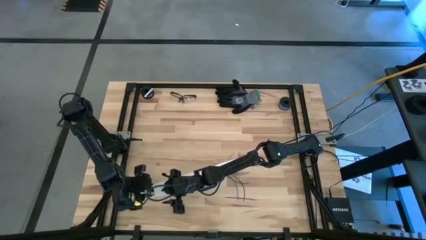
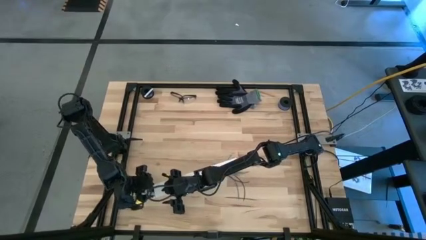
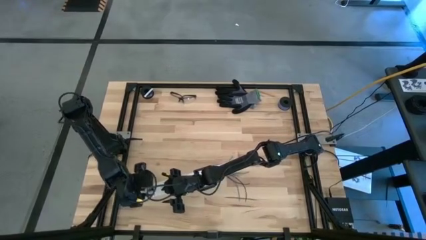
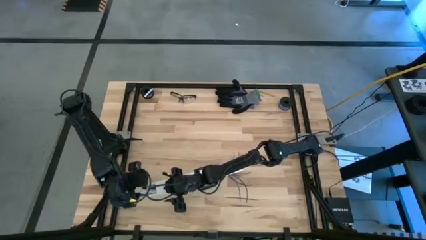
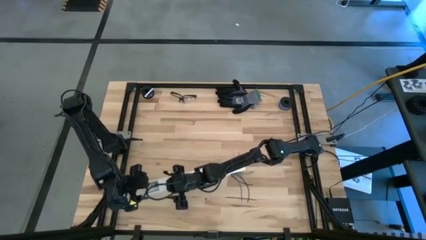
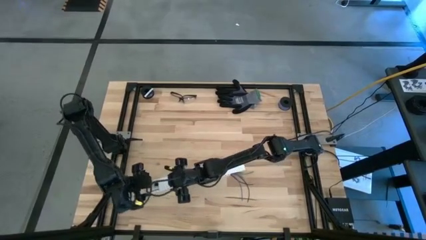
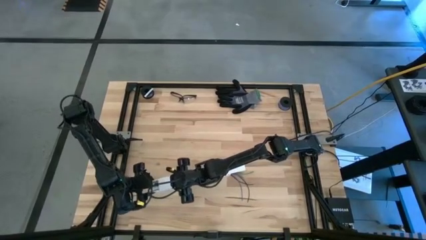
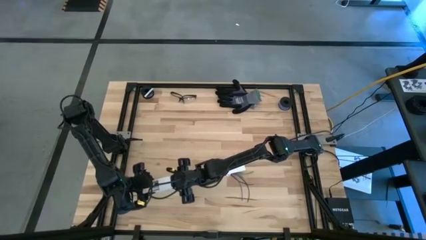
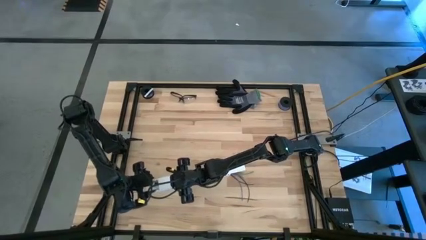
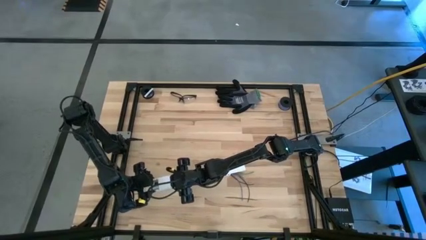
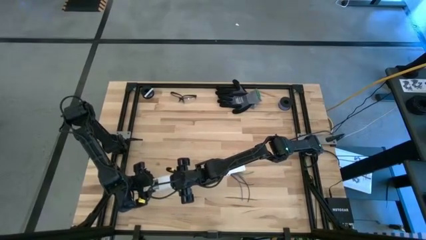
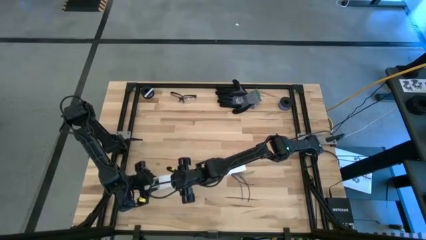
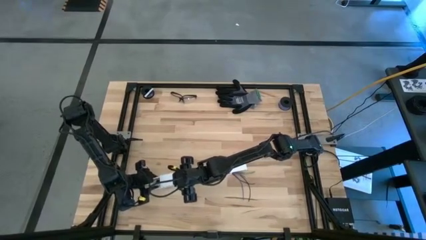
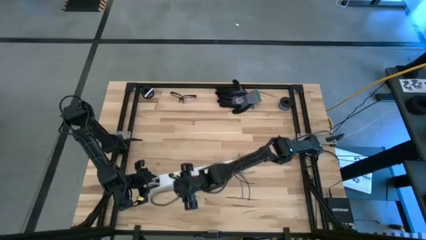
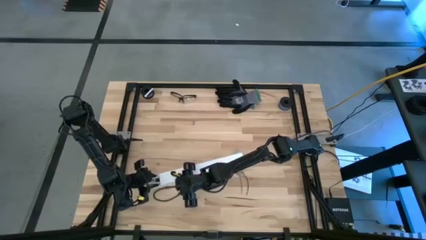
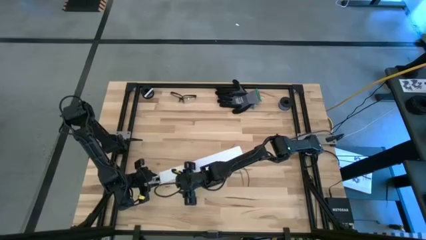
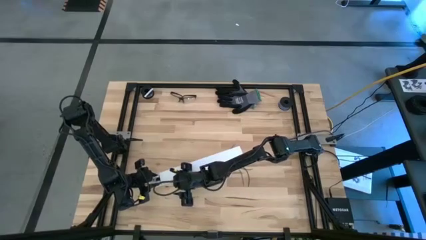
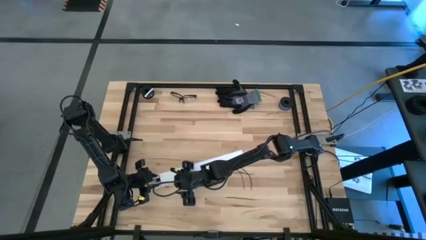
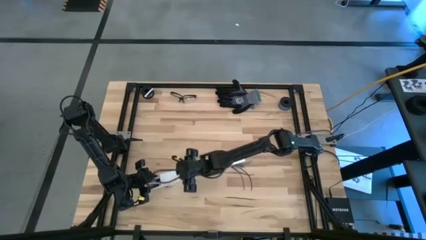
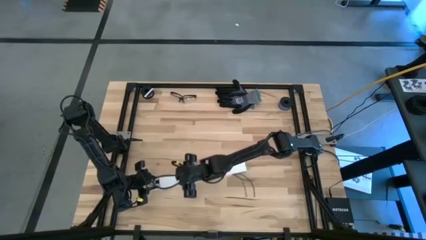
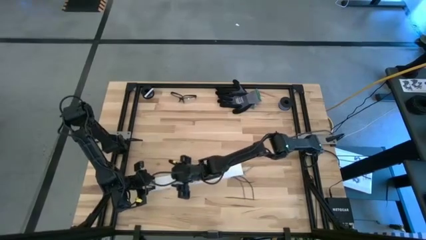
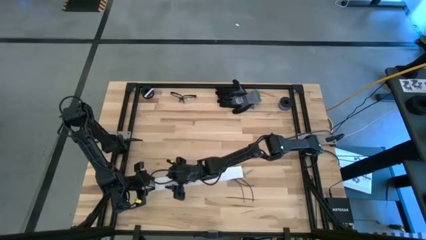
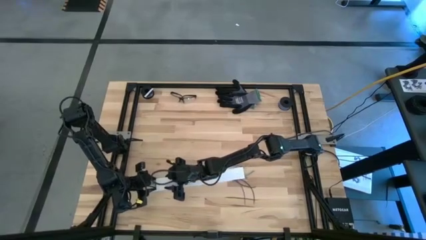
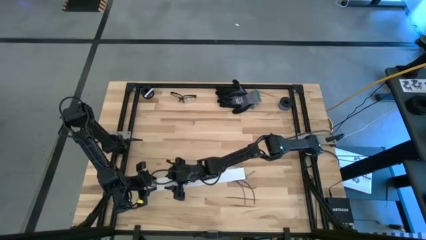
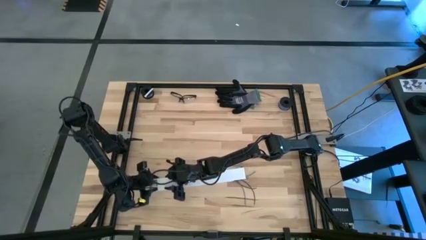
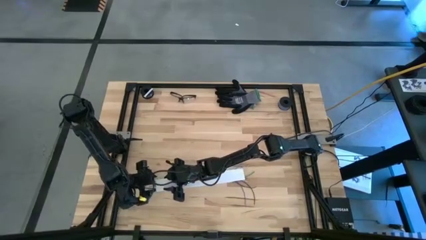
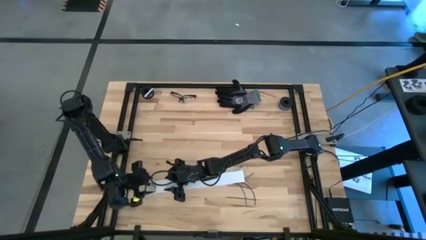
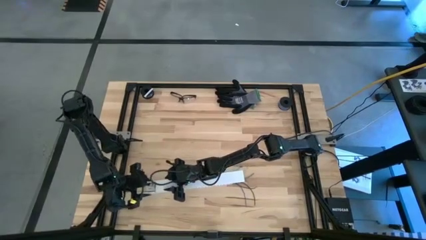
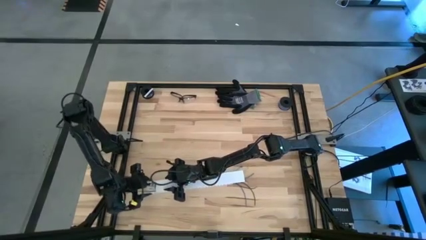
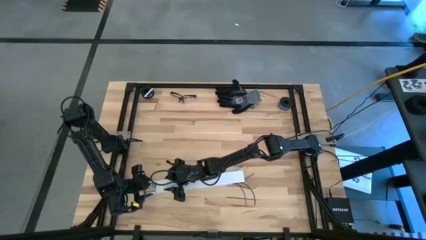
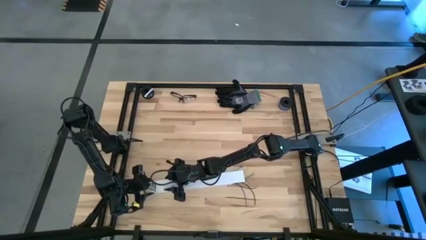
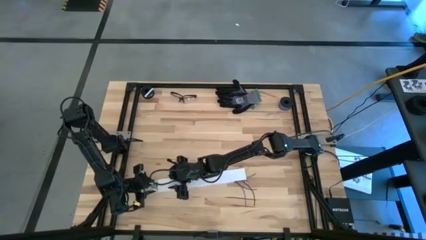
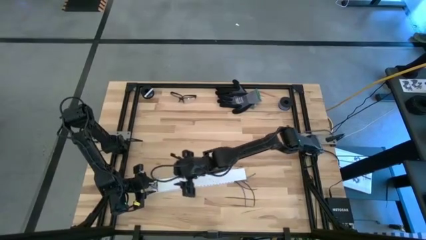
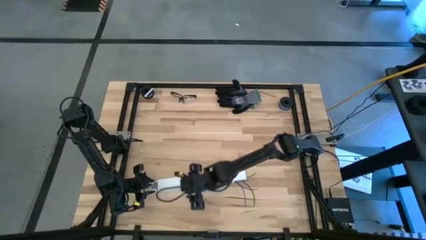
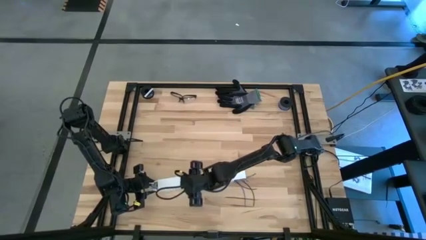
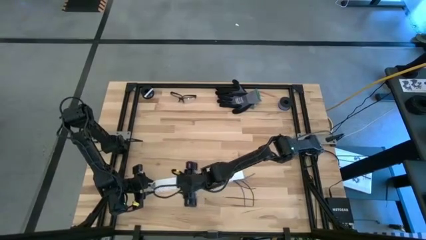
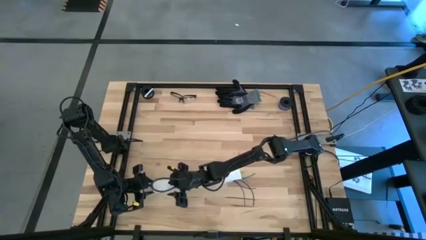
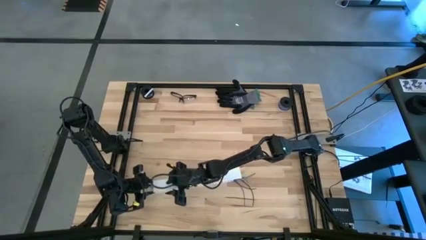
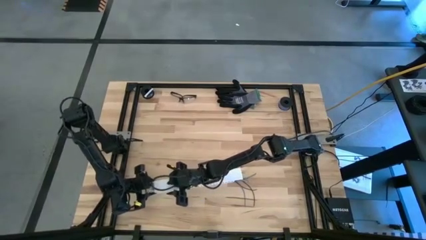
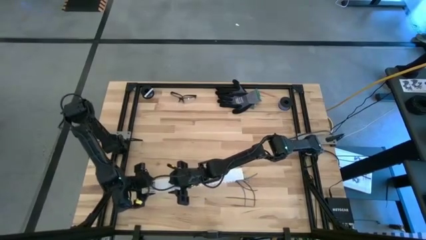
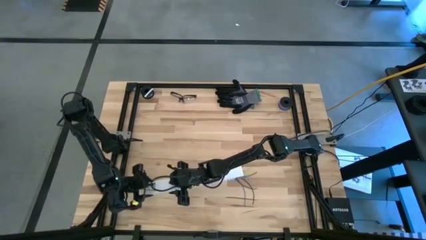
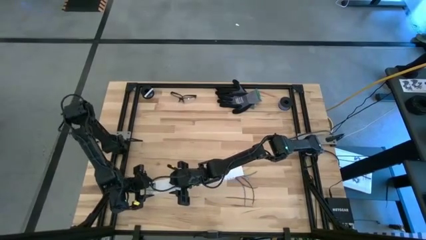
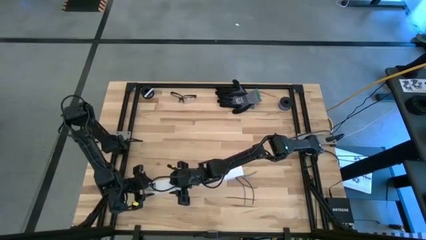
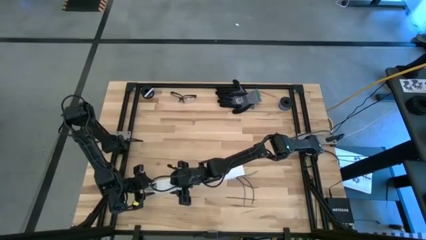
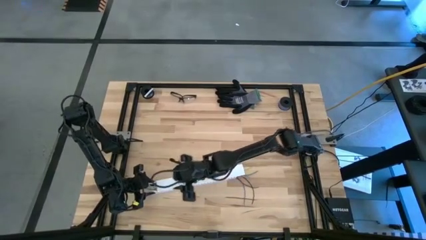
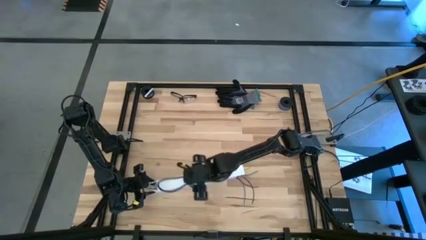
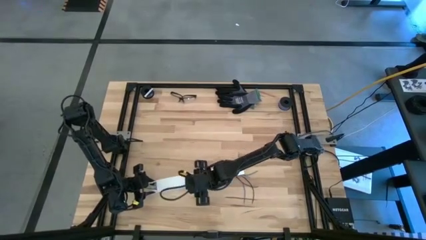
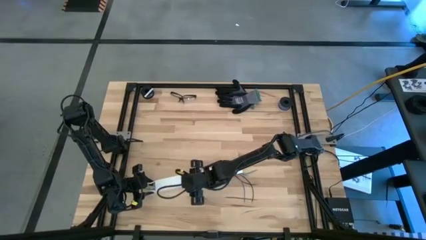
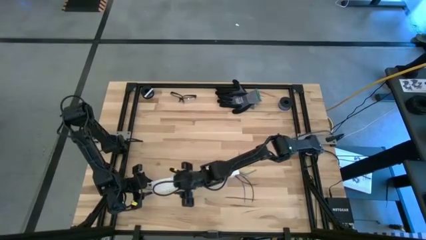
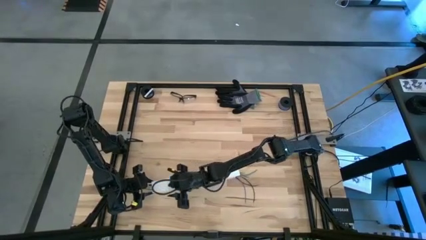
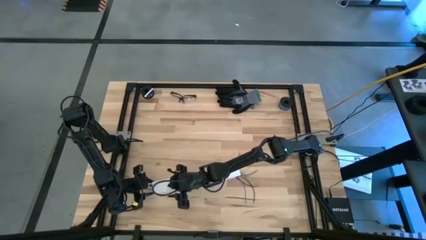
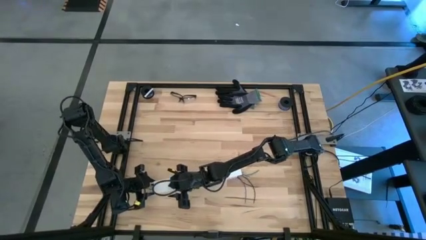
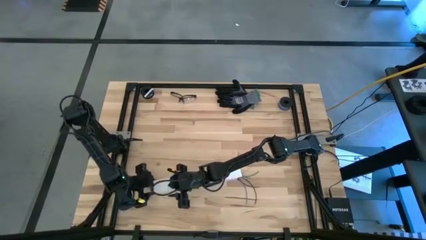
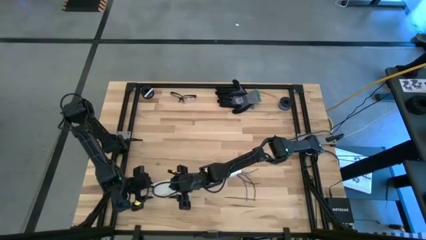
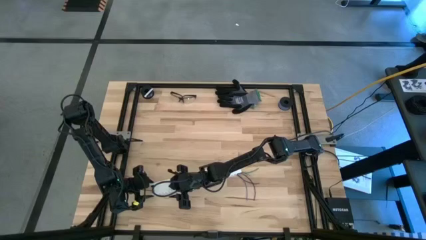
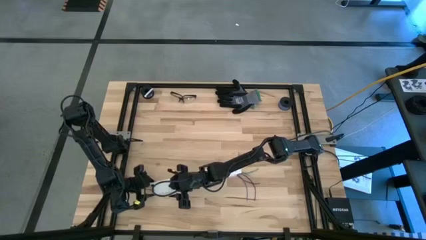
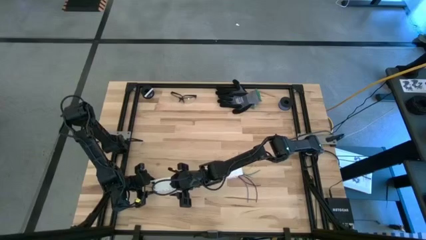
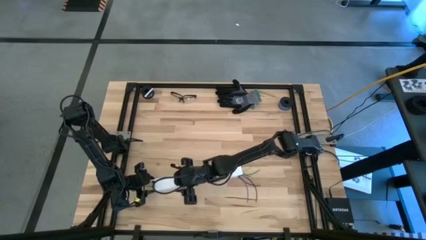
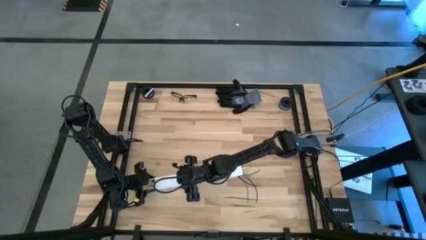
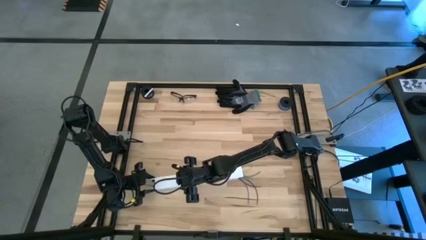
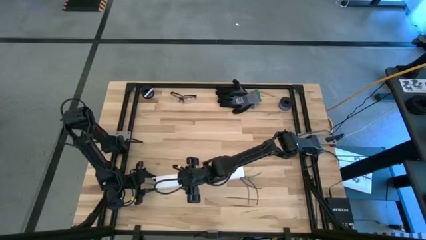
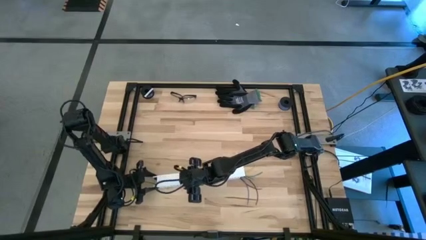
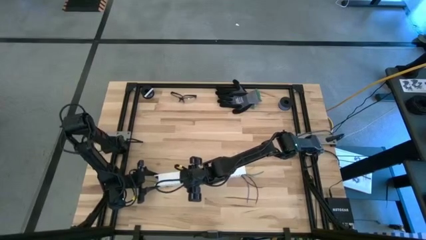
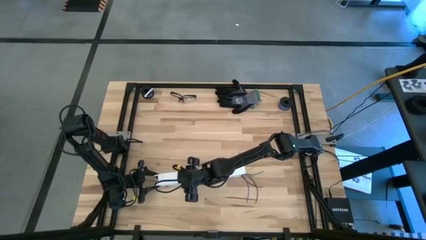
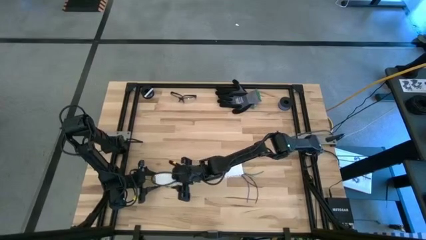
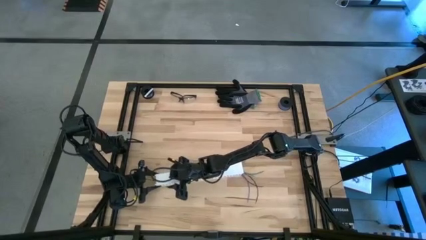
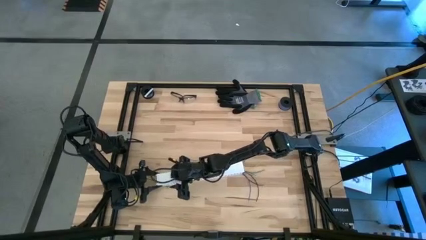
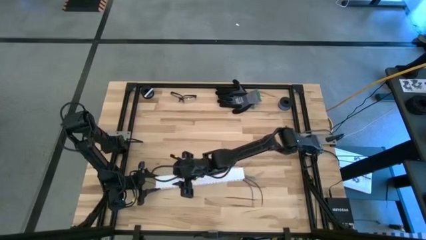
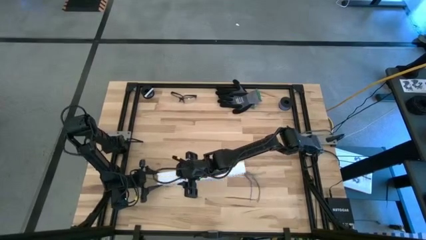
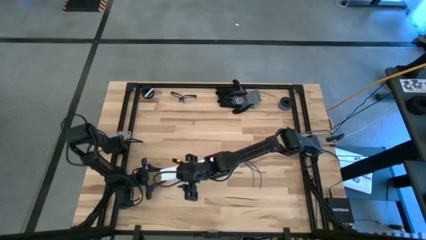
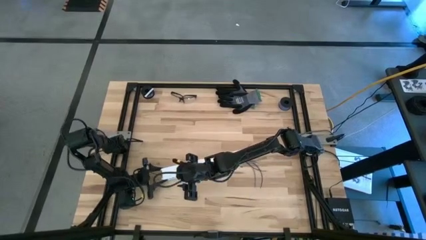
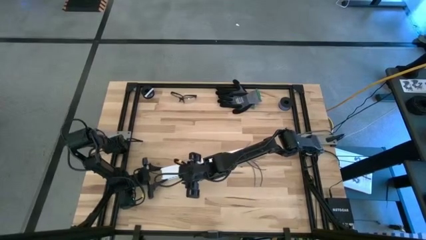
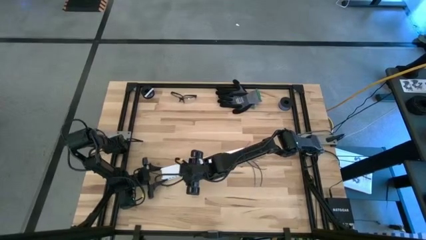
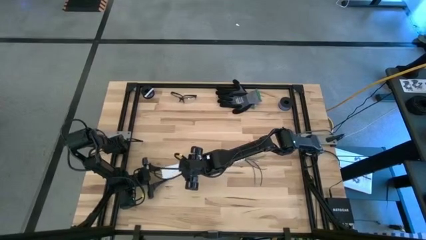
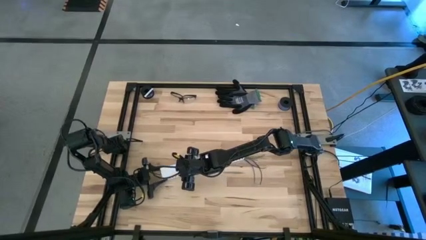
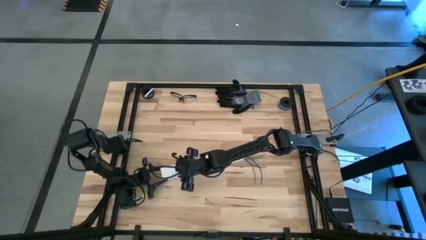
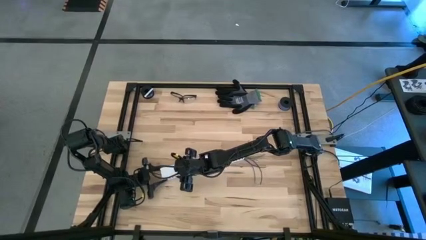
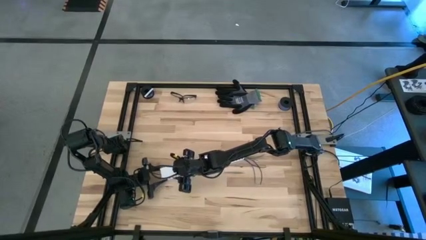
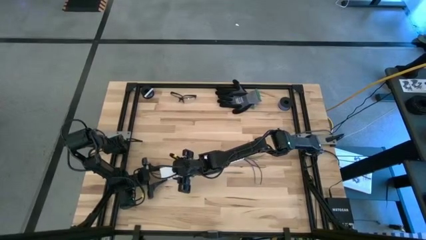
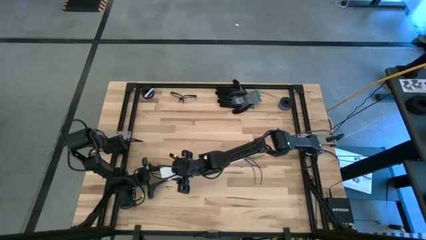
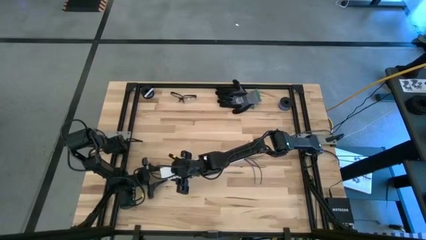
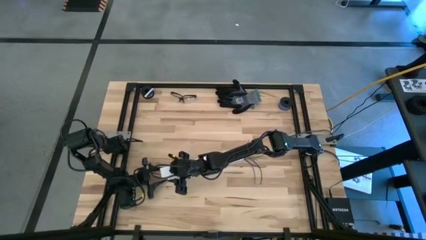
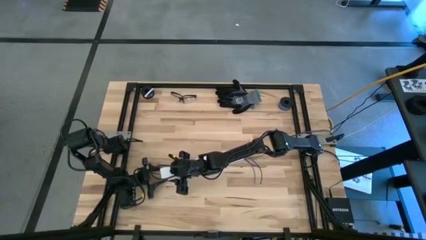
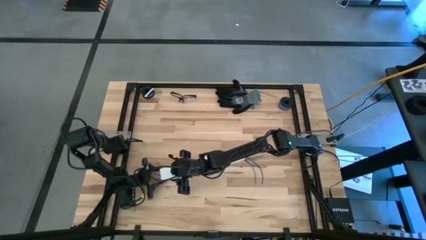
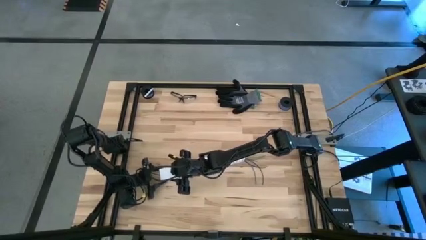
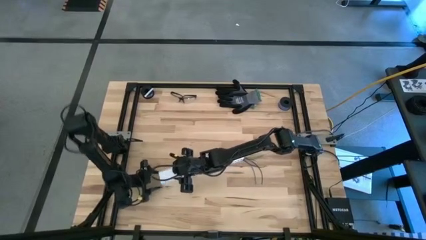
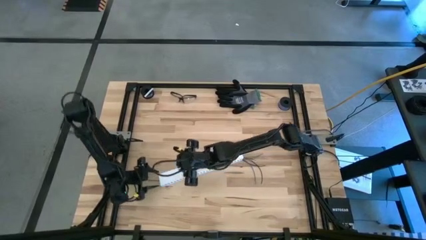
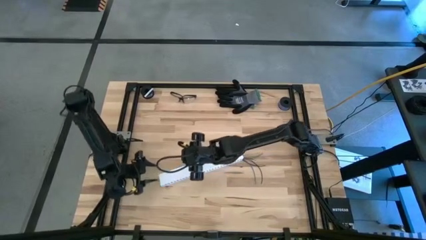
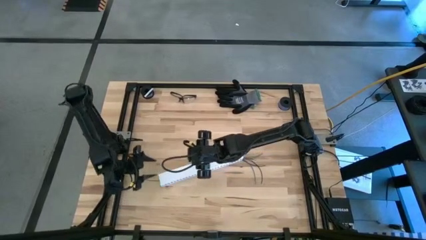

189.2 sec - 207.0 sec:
Task: Ziptie cables
Close the cable duct
